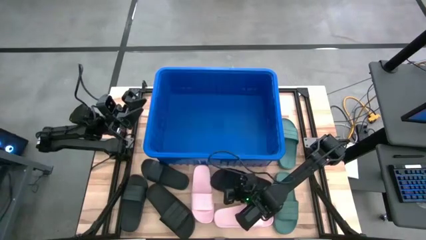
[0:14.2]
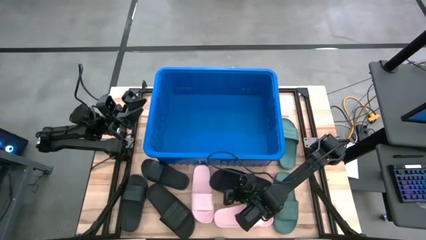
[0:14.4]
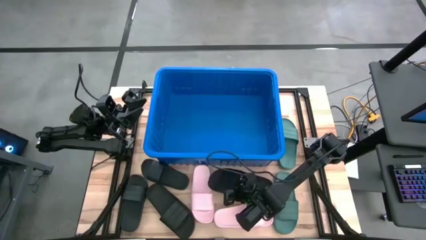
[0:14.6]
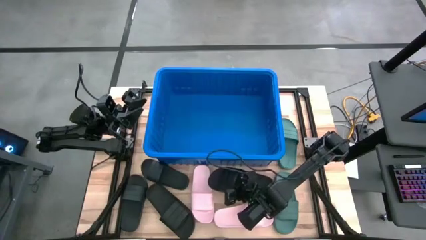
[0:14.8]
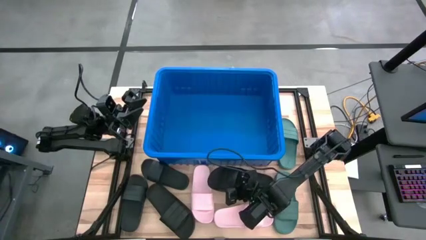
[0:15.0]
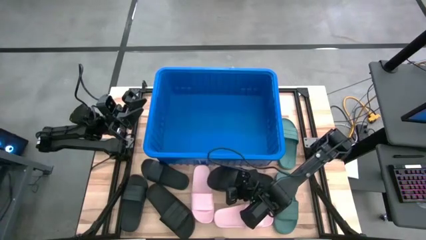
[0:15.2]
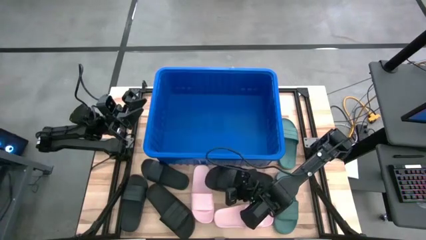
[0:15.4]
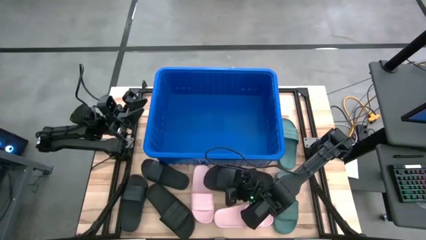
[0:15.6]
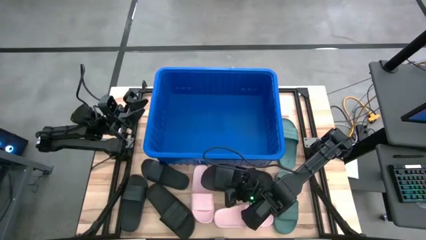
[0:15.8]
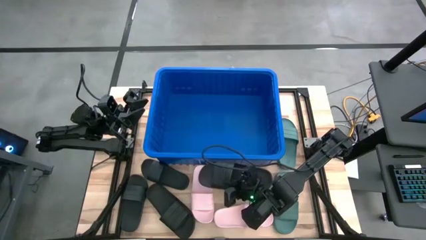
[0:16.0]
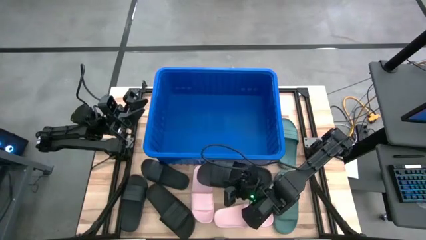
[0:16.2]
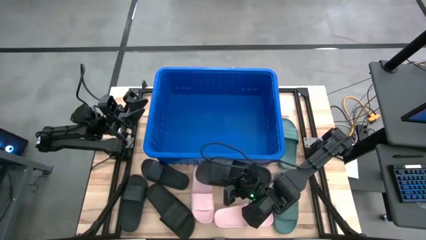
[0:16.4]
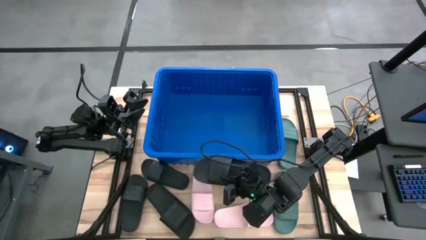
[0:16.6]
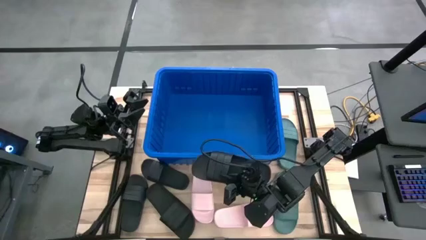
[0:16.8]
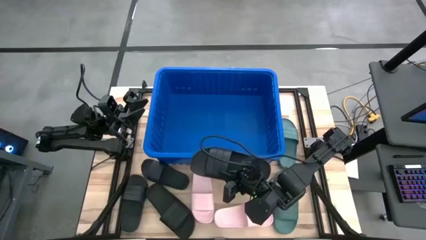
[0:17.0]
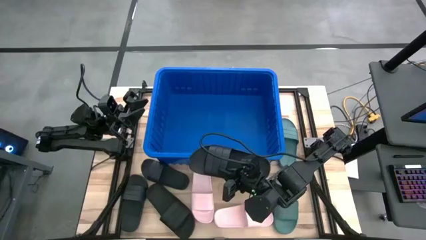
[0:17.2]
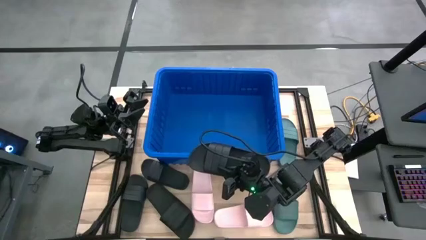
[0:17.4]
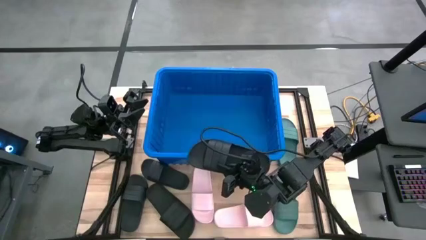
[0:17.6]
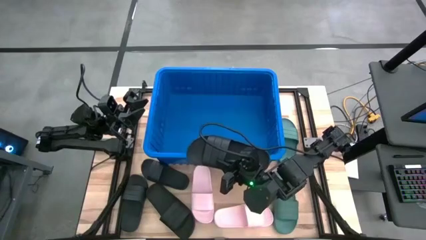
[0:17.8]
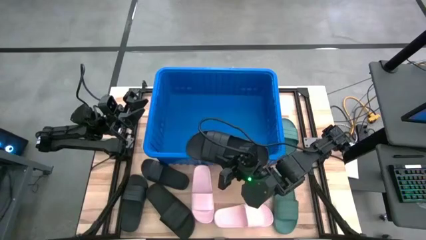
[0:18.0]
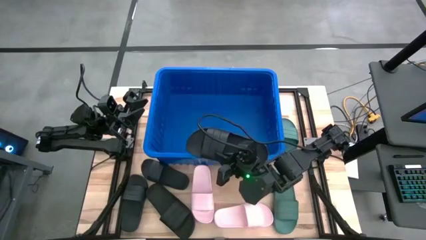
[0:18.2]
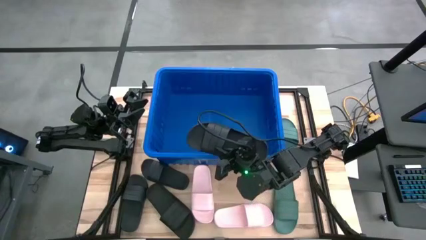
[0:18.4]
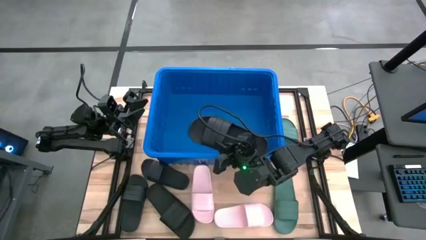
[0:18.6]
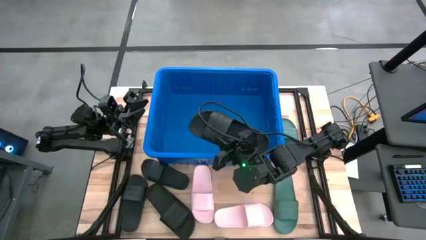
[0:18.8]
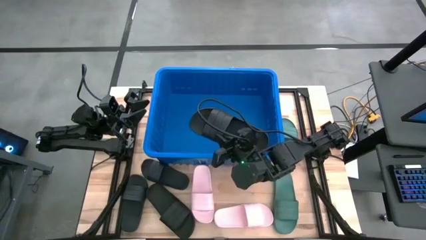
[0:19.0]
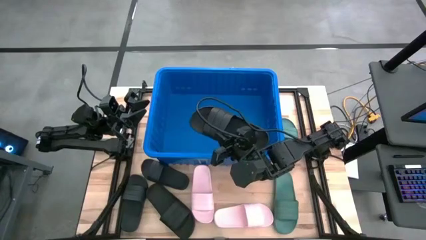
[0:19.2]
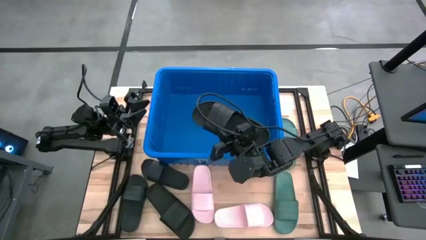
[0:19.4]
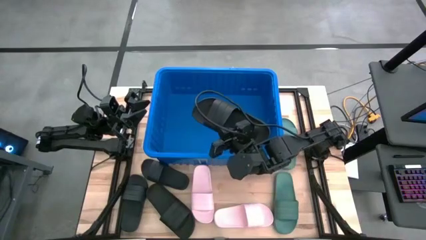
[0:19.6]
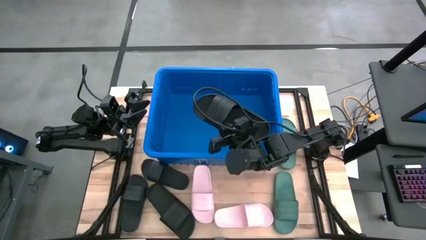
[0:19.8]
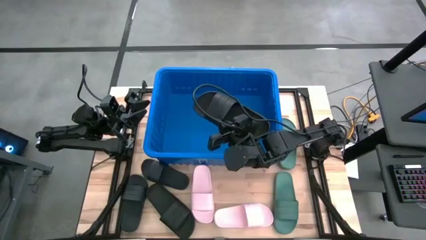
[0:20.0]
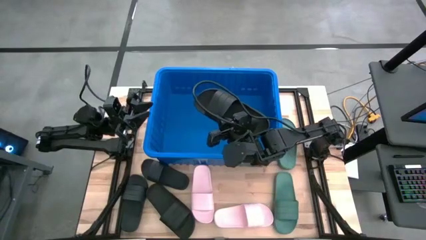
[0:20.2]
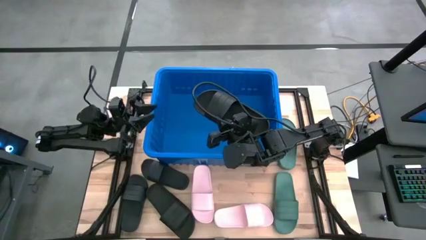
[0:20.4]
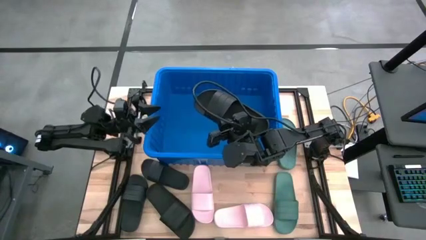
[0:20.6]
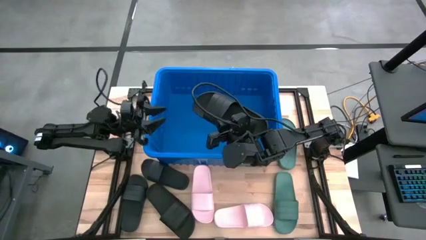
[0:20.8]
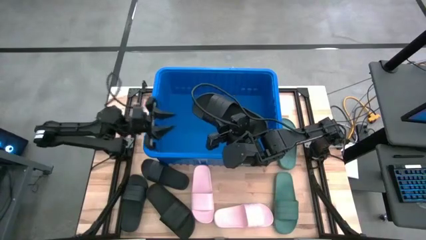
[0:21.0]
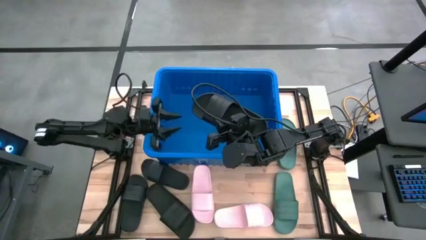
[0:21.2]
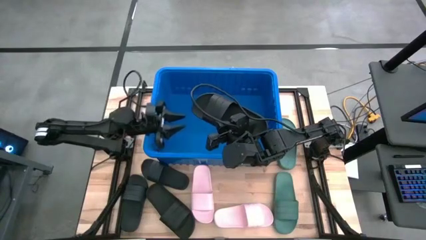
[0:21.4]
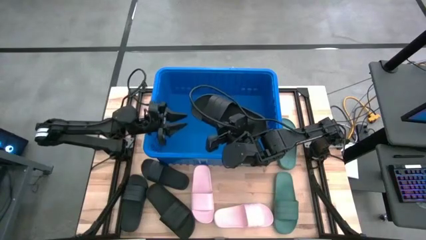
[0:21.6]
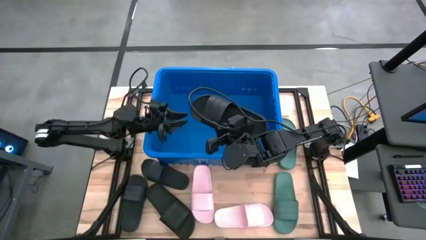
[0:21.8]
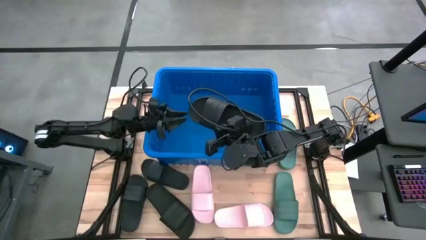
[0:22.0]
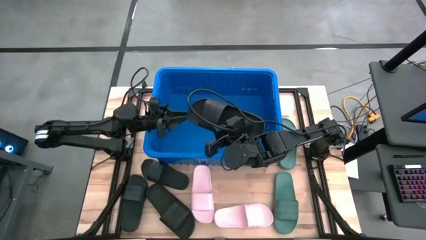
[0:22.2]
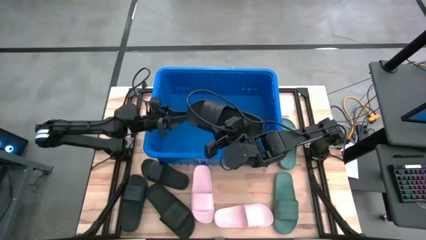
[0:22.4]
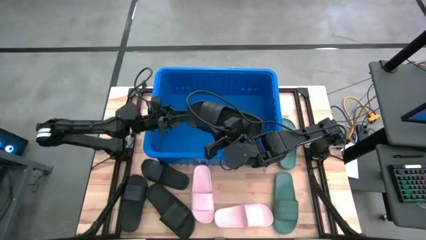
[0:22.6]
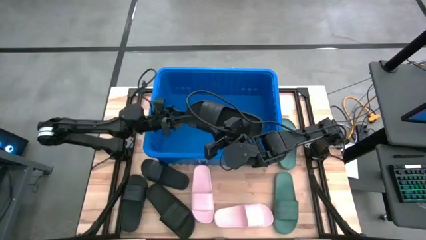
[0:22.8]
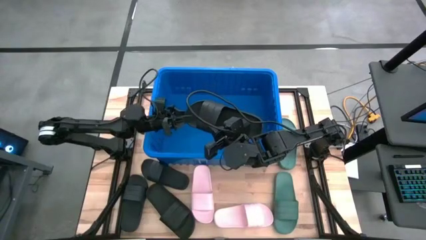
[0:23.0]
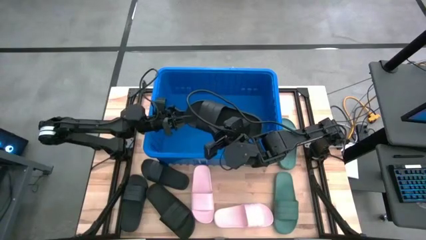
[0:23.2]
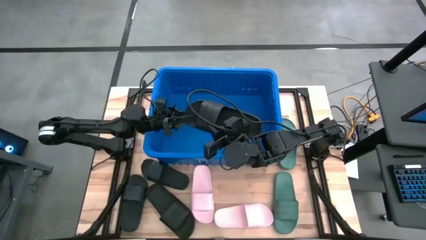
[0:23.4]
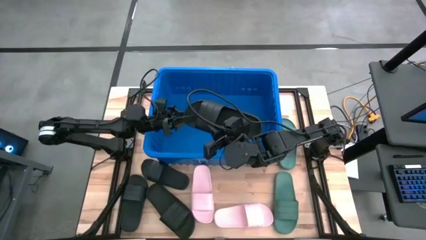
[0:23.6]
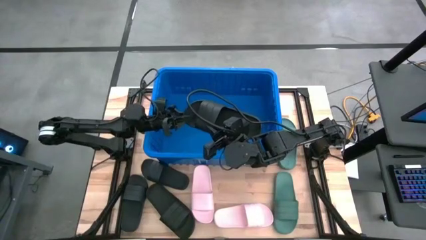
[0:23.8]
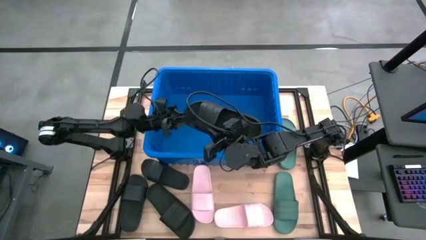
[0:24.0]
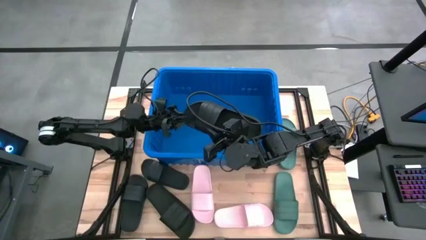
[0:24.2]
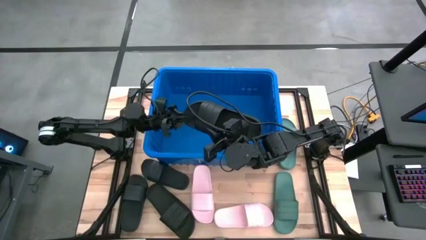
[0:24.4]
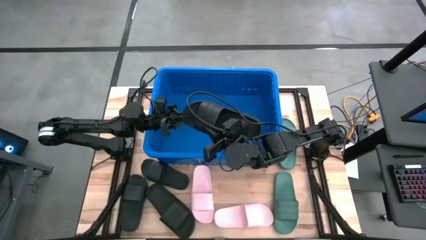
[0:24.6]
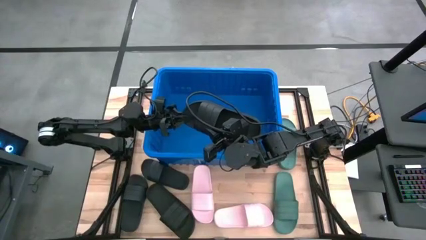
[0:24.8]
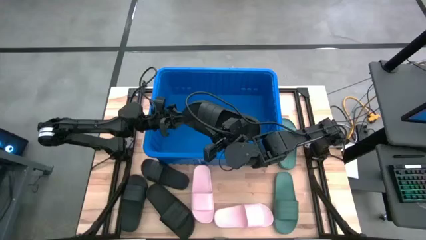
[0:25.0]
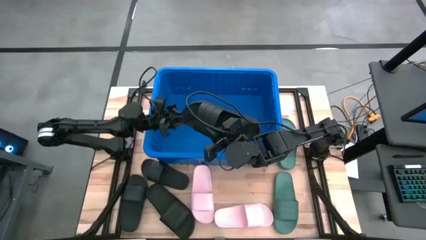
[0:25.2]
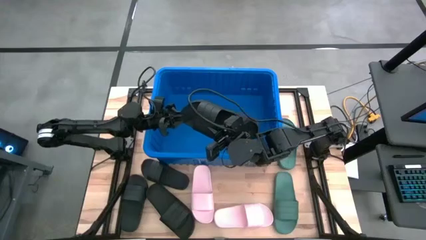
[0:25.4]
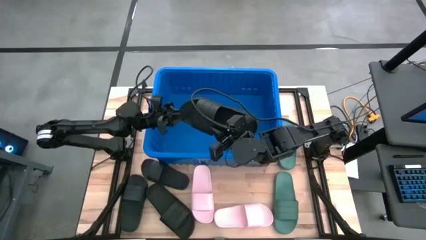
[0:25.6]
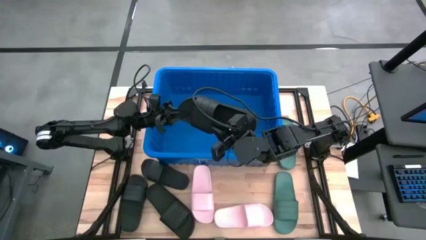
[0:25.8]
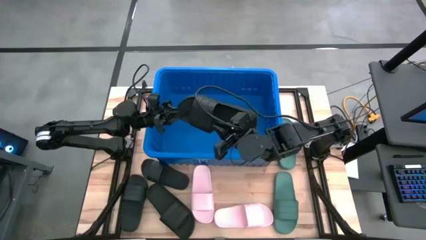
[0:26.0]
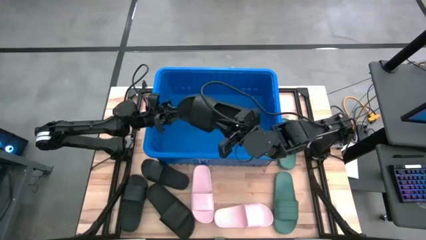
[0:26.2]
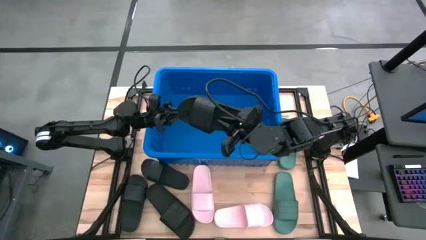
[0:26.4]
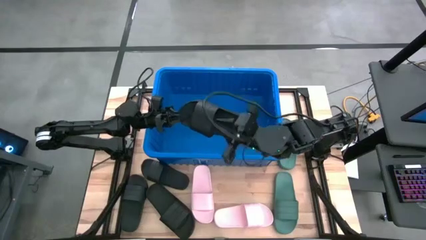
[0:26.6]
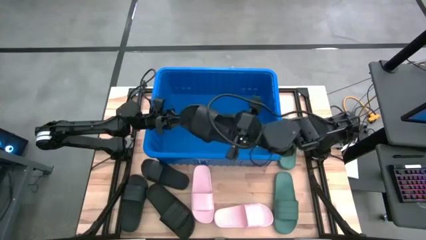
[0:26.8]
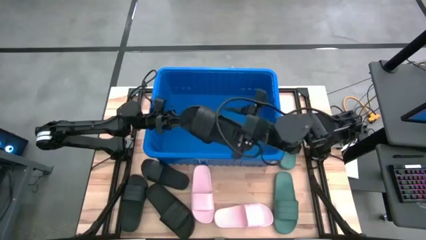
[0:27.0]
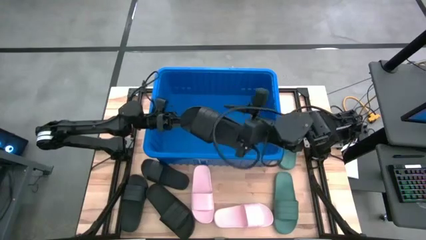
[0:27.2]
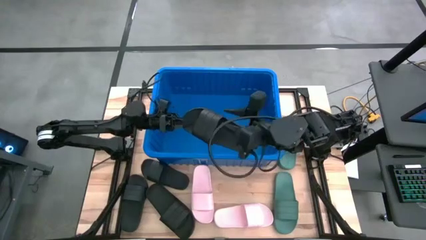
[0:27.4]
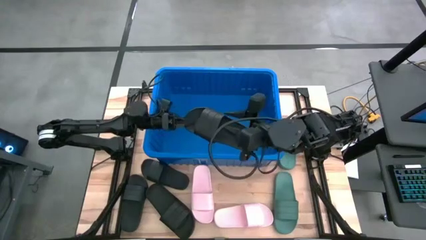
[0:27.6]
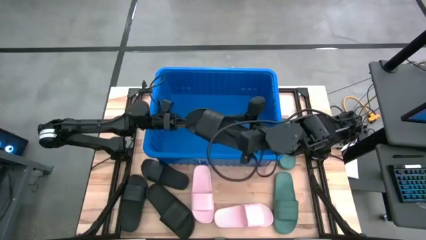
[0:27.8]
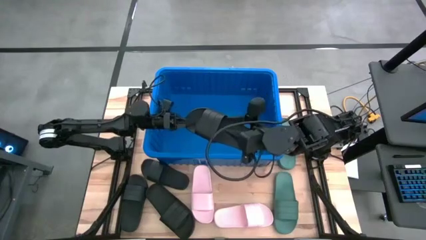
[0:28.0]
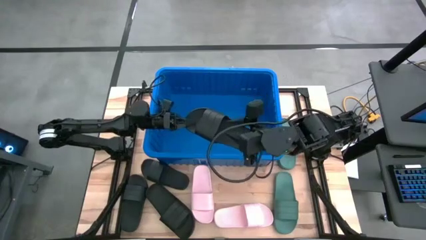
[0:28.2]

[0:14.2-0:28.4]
Task: Pick and place slides into bin
Put the black slide into the blue bin
